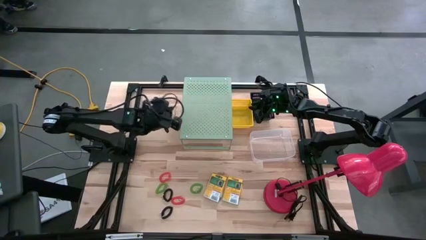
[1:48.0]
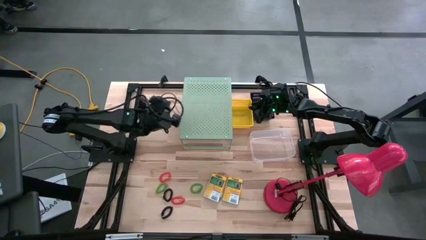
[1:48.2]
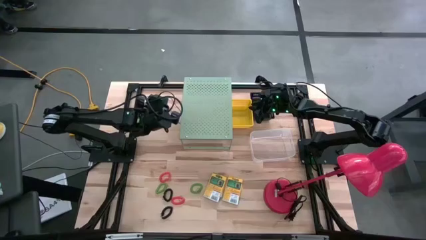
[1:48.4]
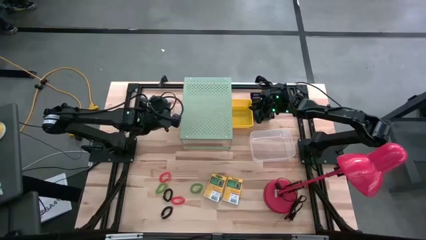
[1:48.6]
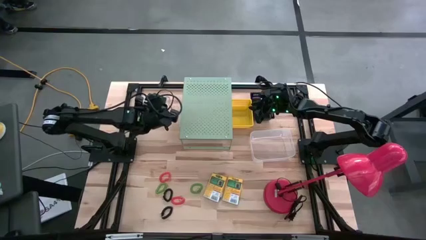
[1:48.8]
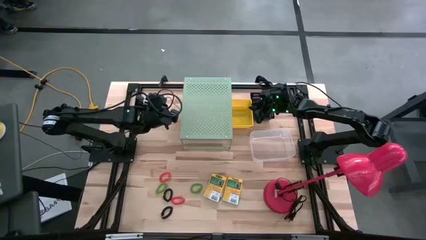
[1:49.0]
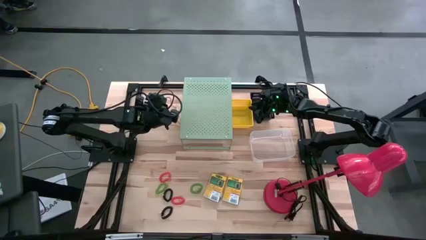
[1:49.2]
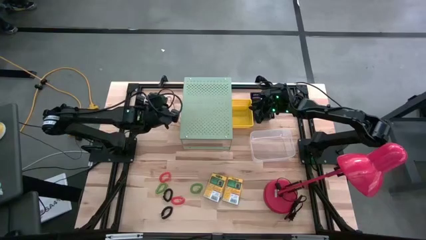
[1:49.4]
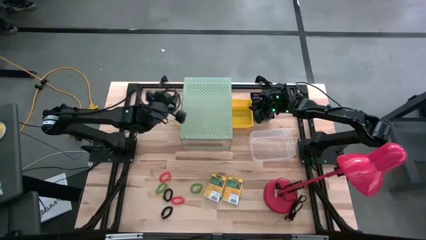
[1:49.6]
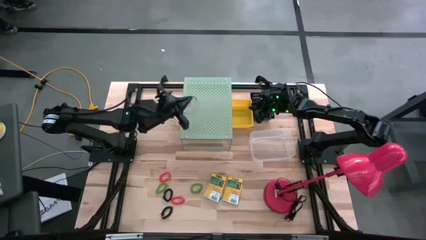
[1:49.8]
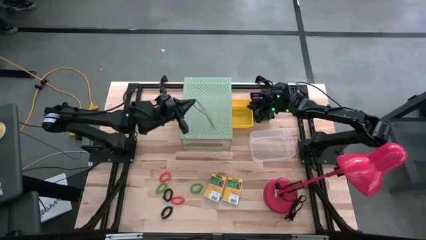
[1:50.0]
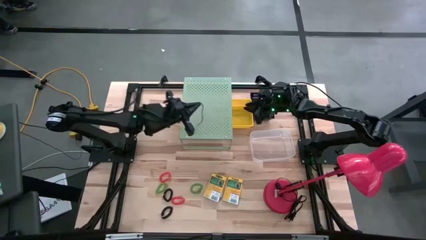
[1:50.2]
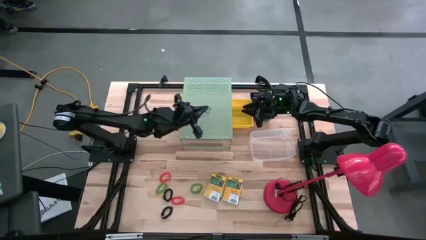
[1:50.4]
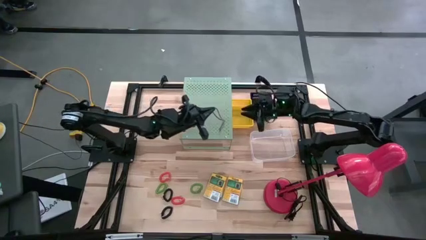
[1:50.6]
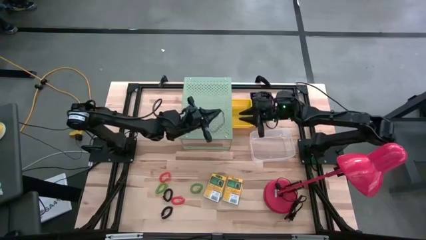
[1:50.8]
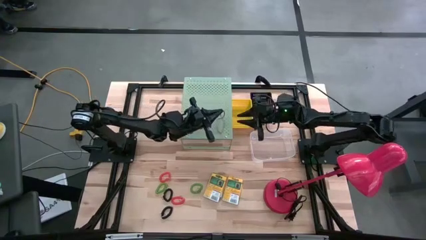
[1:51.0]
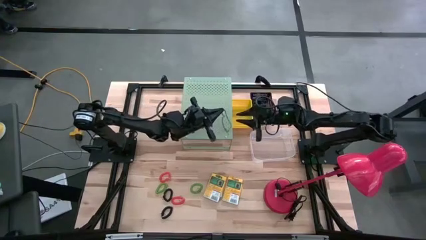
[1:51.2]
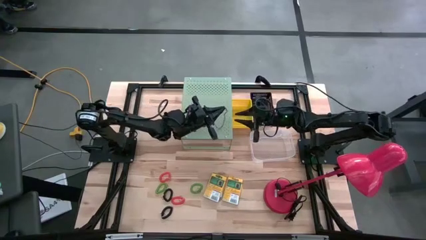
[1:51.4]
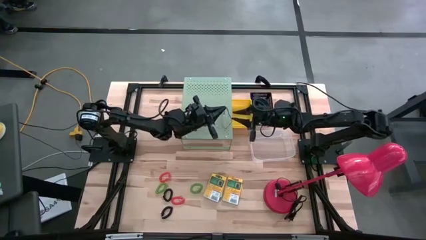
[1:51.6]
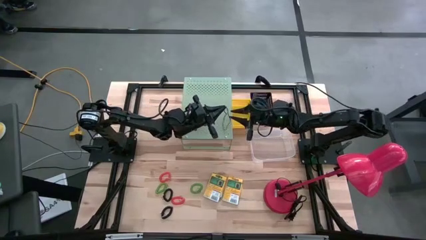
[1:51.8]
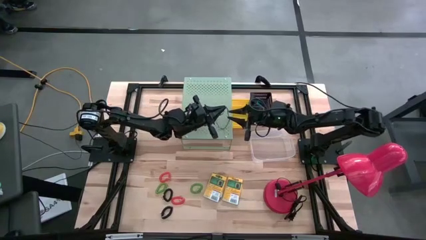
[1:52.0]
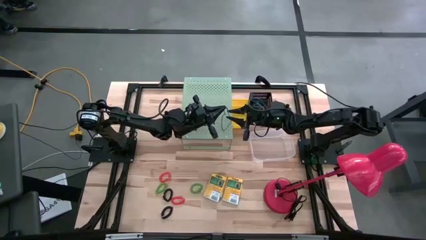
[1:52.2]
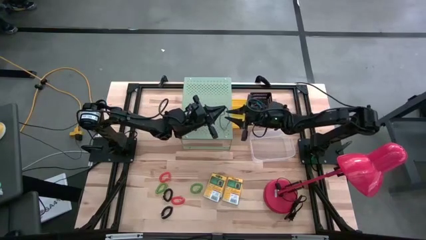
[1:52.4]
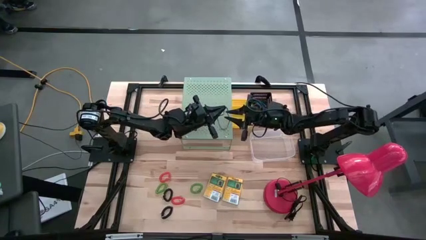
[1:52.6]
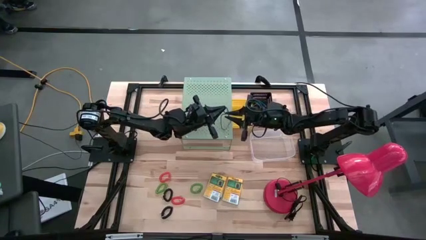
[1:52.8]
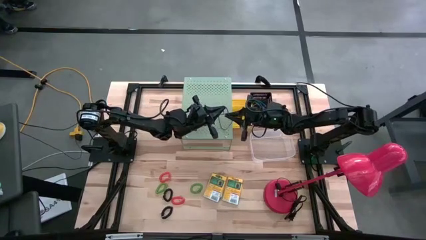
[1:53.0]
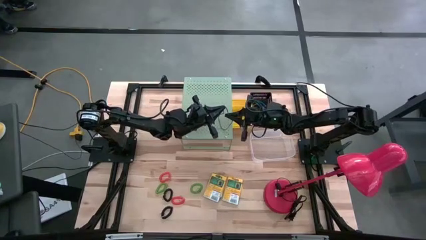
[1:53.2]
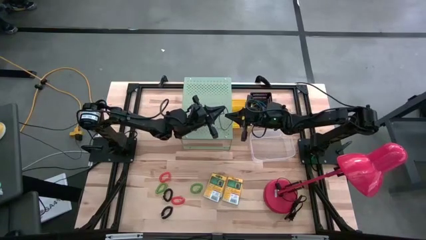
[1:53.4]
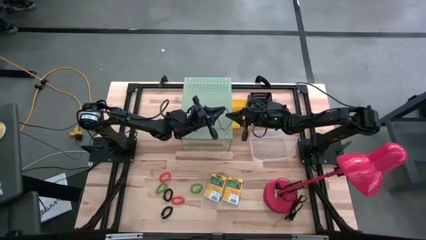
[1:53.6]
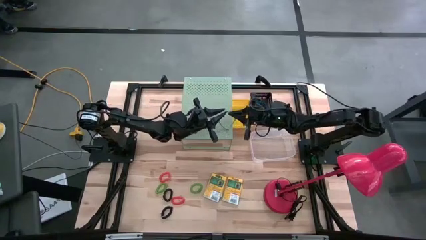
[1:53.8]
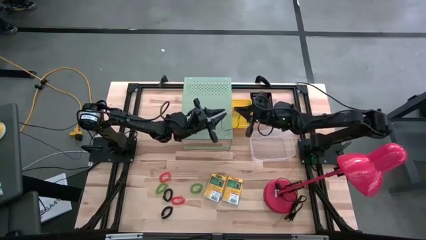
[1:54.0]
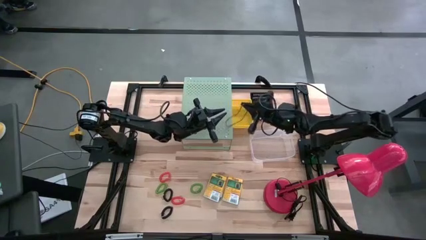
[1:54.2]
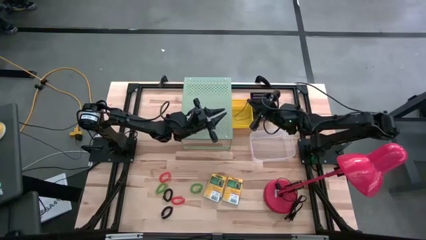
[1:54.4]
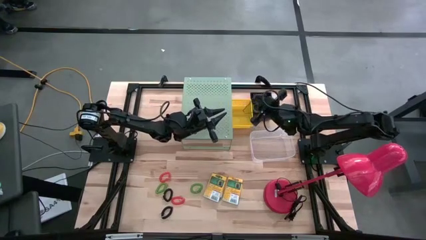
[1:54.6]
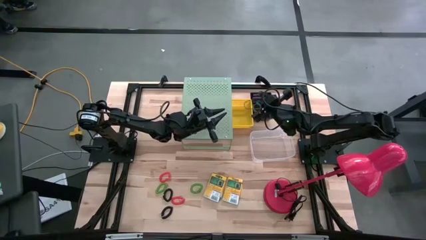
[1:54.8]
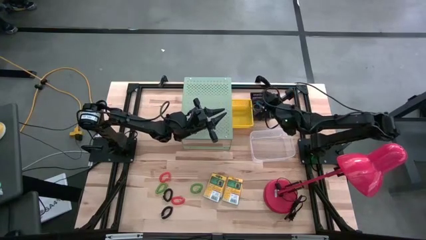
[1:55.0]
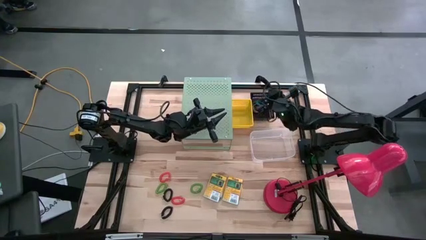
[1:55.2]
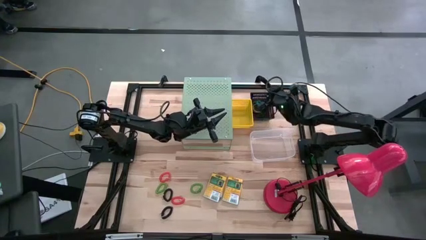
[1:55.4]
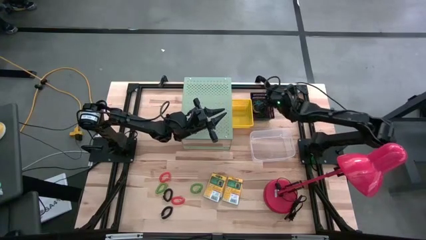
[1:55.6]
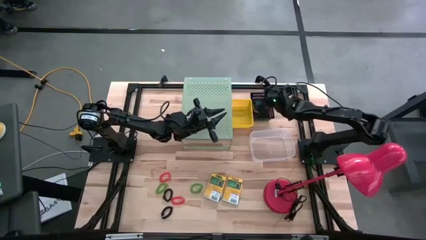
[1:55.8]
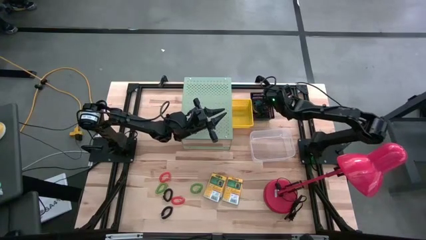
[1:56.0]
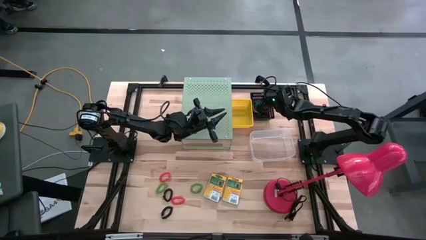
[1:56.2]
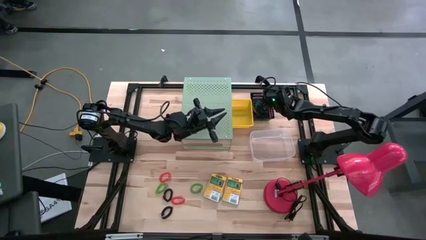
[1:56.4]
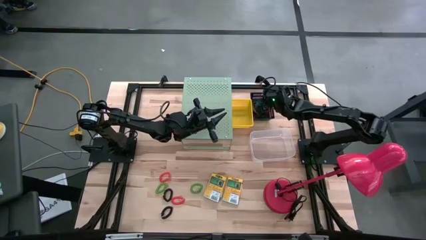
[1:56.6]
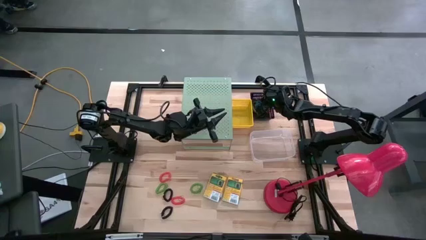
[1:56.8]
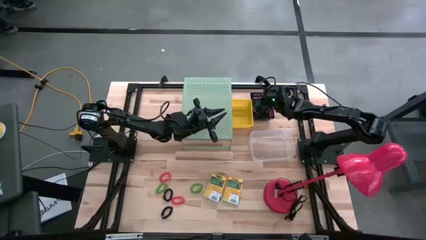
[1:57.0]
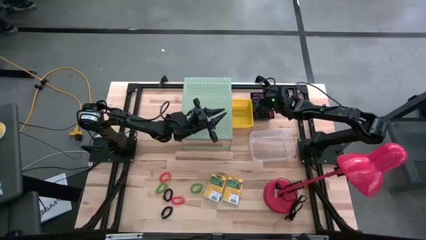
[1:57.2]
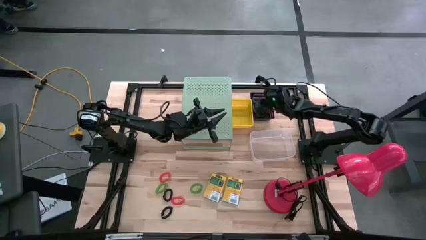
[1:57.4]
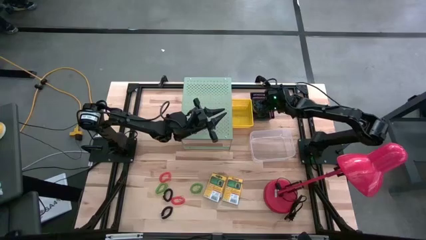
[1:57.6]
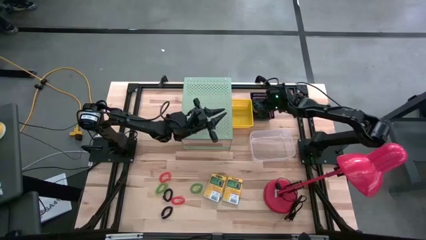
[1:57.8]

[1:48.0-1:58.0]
Task: Pick & Place Office Desk Supplies
Put the purple rubber band into the black bin
